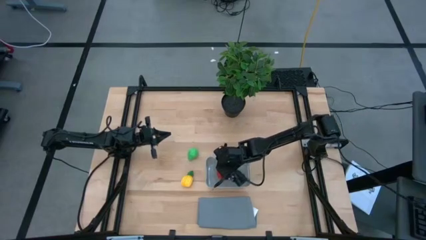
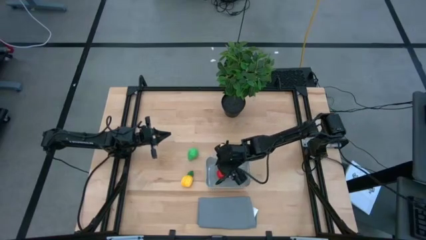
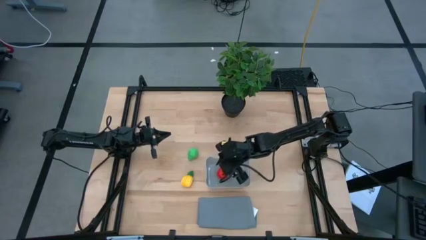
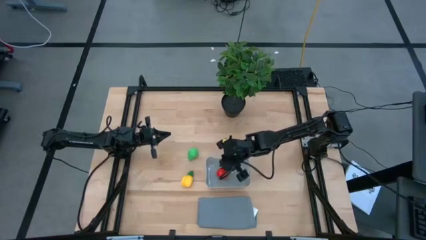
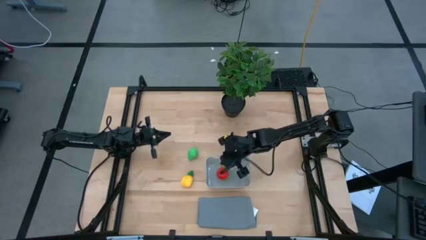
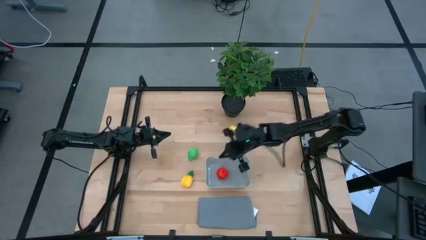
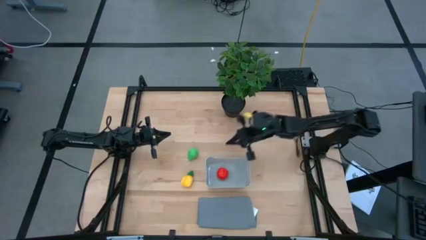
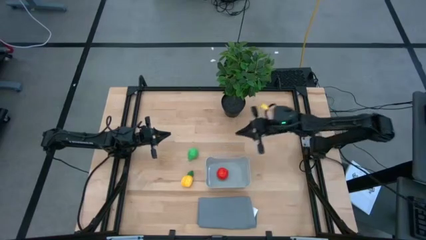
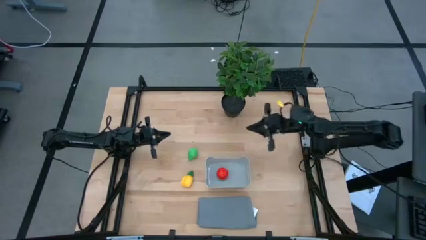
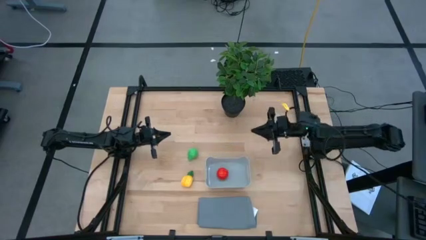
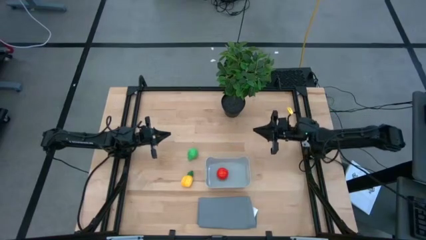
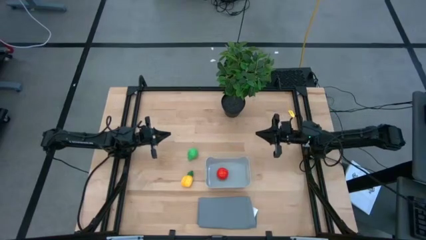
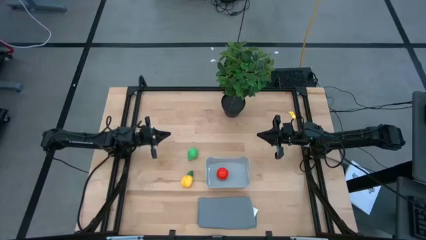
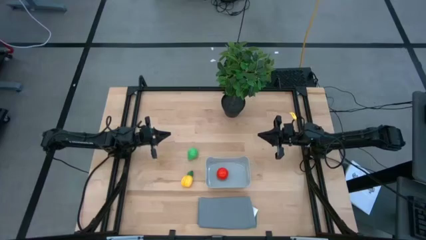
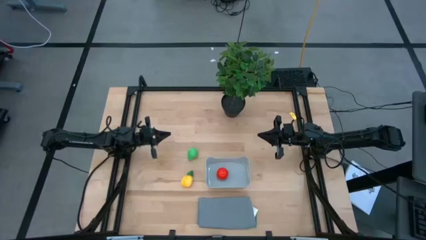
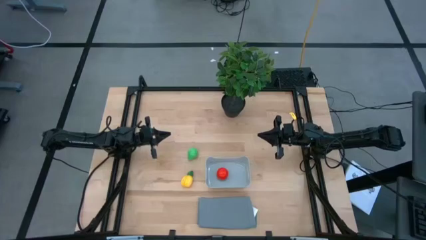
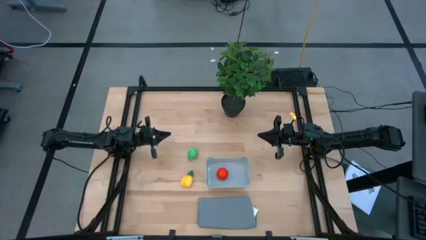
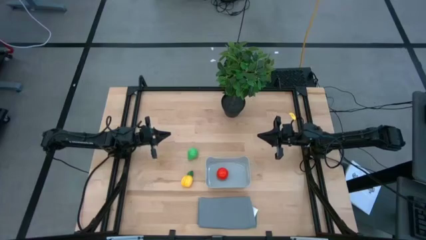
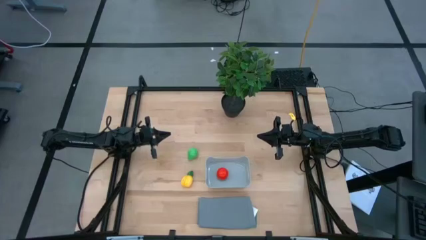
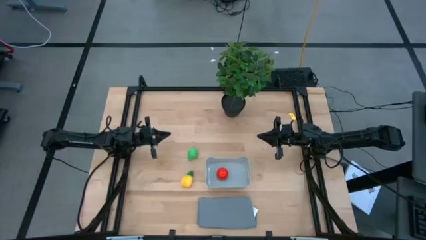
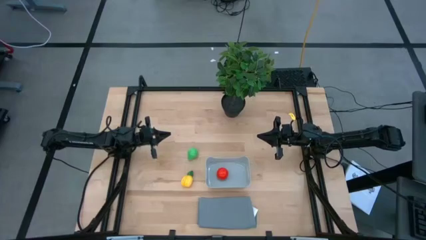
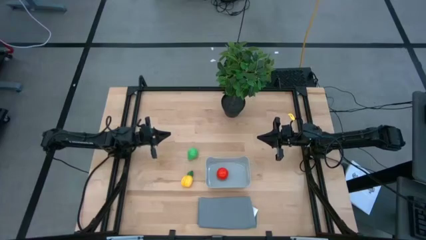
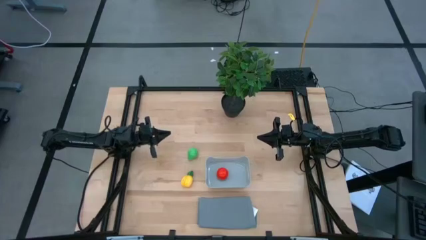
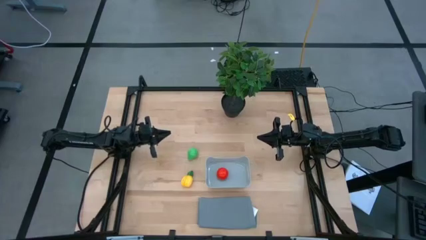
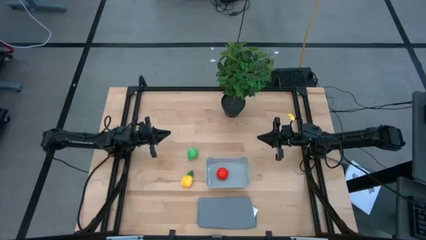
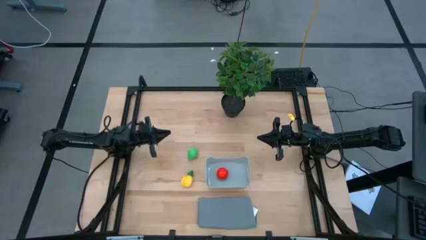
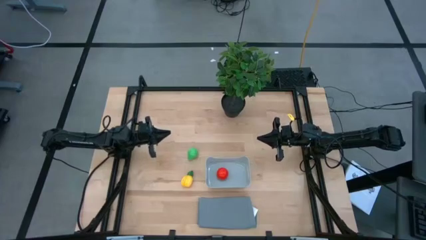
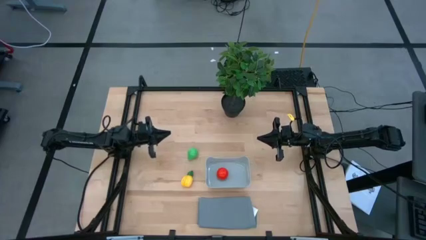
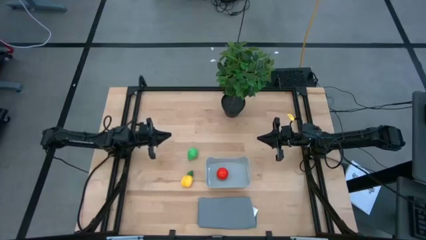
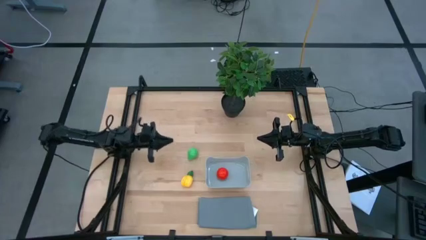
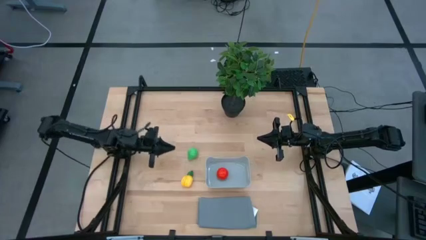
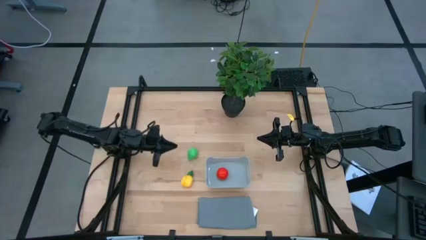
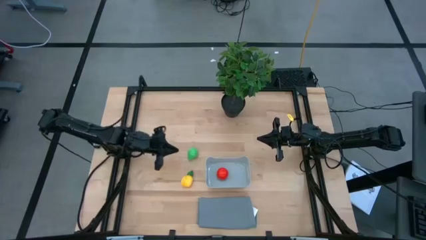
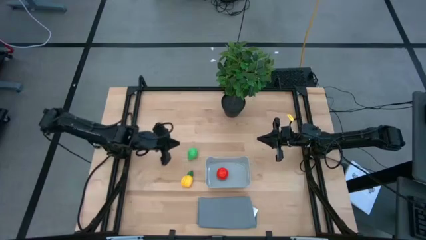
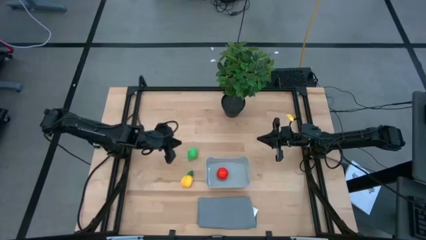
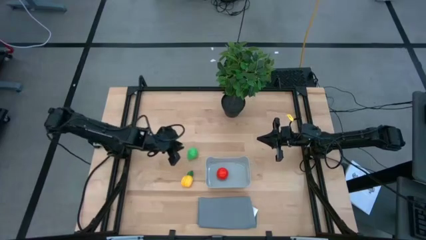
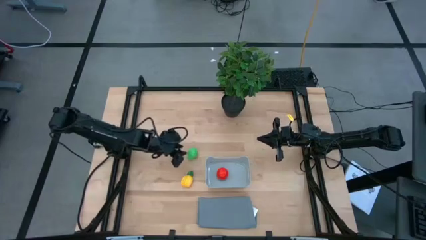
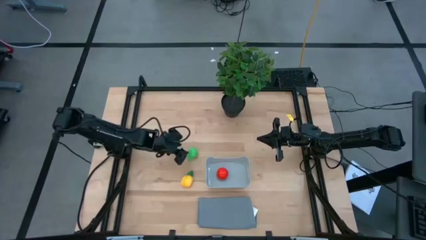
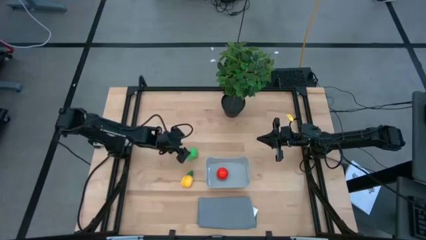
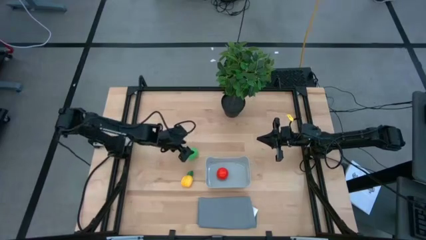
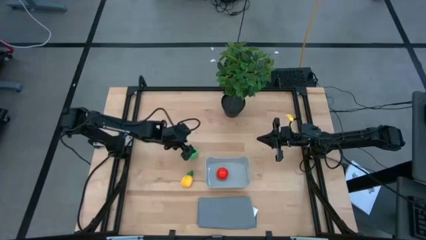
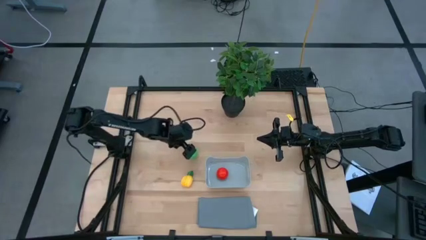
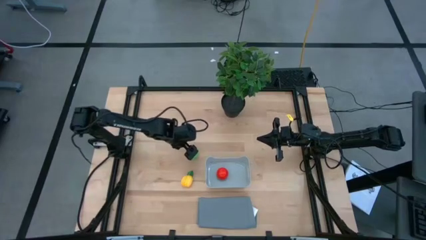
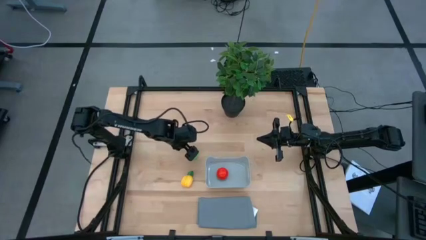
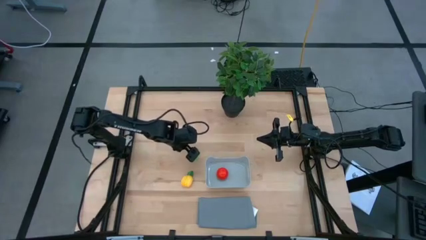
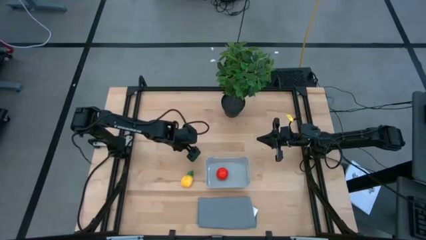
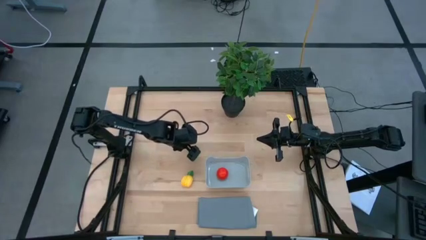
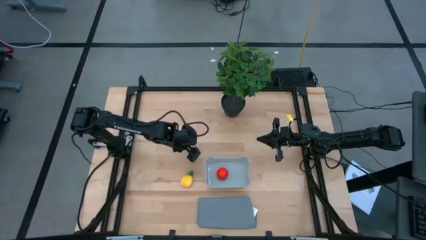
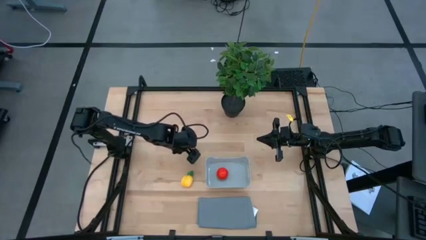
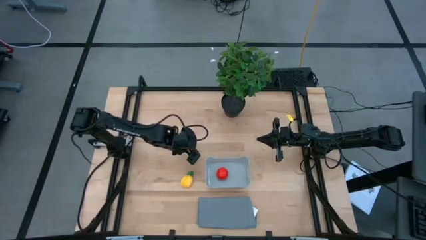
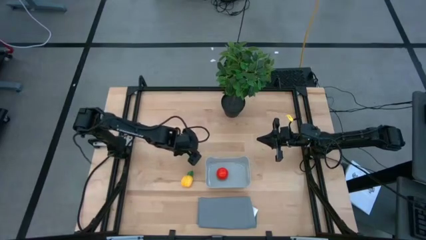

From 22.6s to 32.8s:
Task: Pick and placing Produce into tupperware
Put the pear into the gray bin

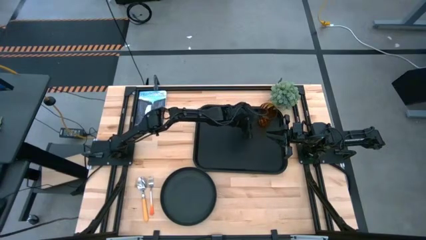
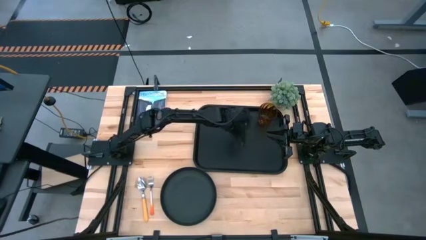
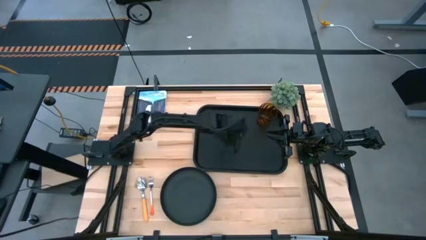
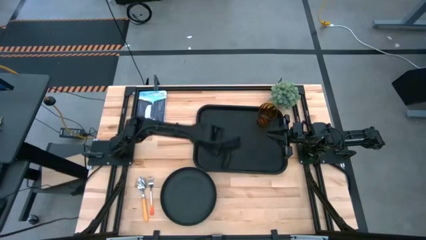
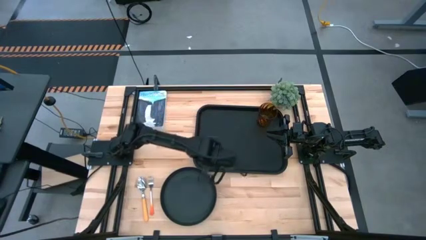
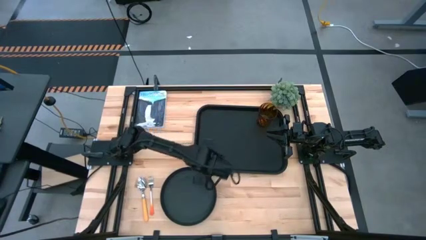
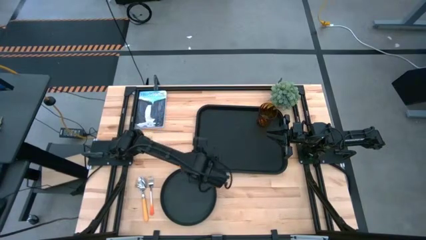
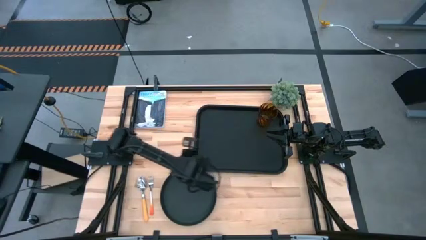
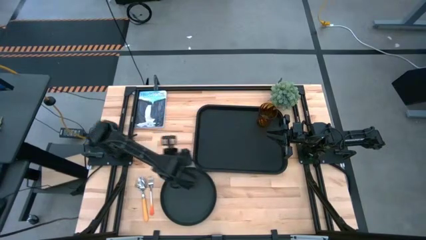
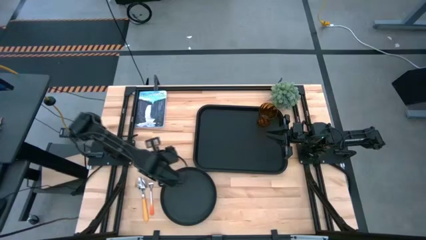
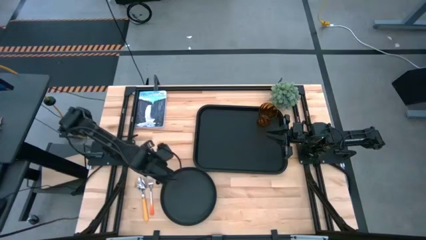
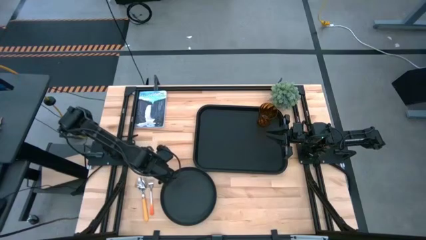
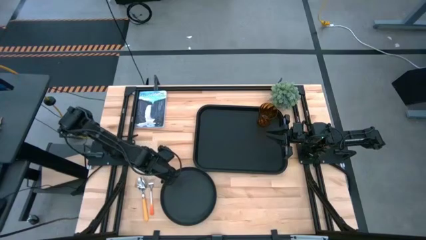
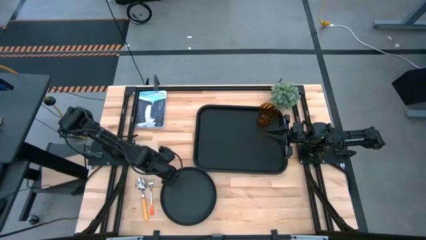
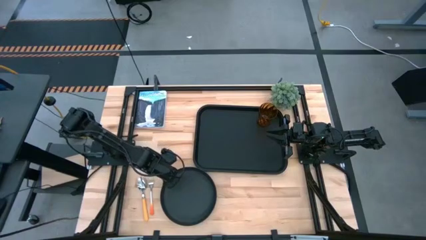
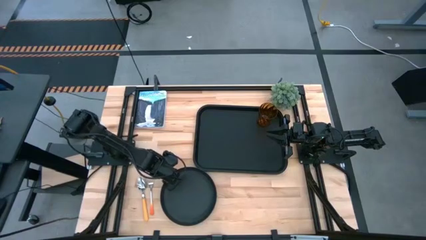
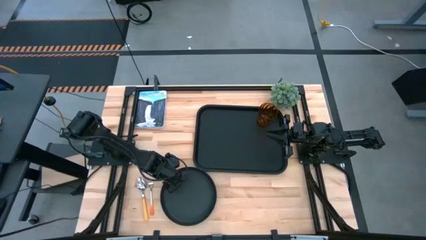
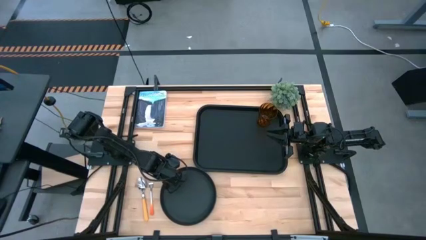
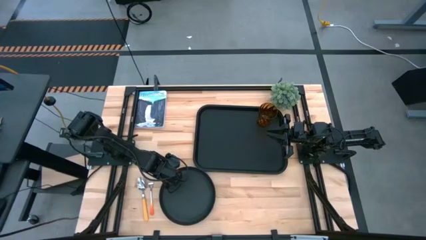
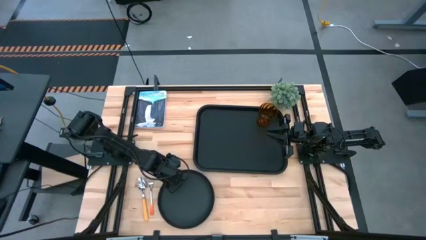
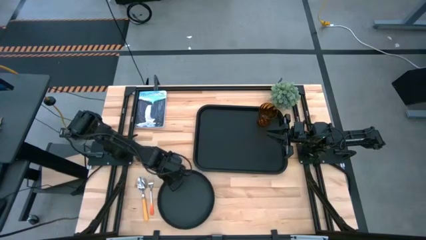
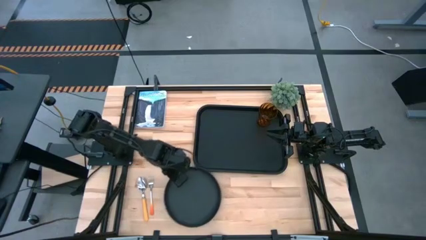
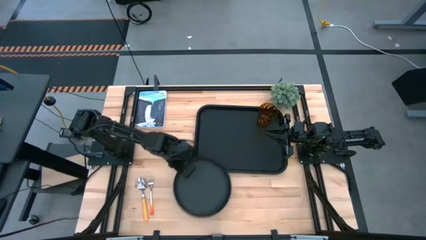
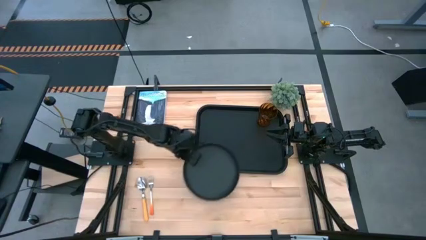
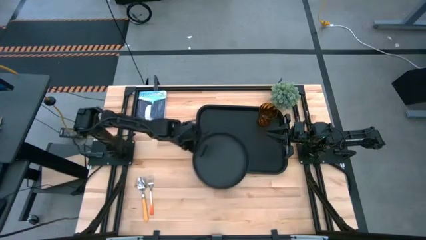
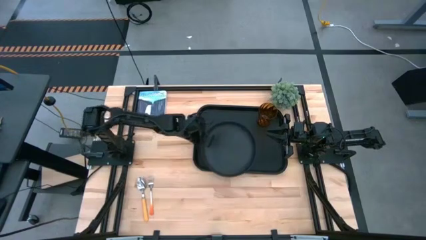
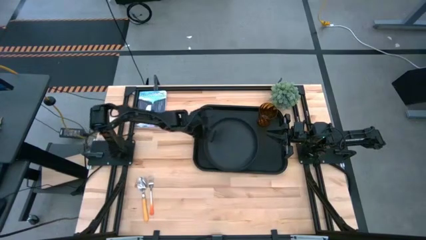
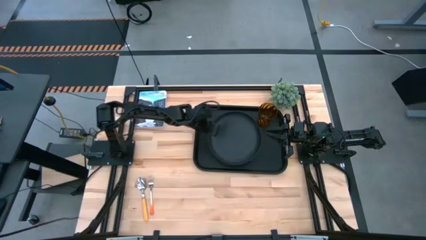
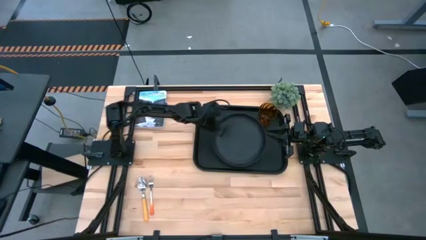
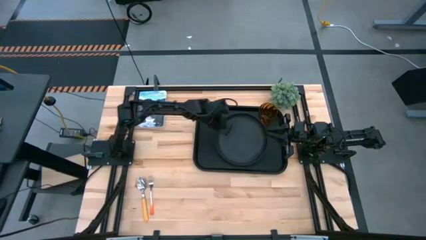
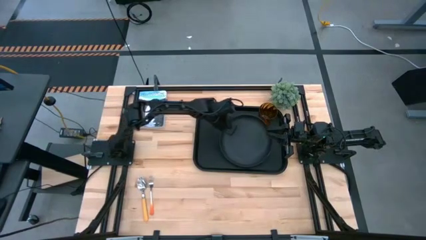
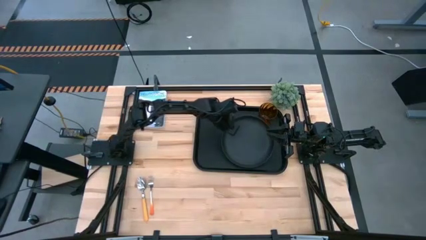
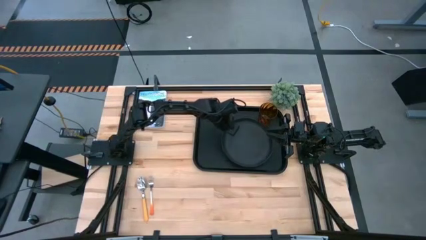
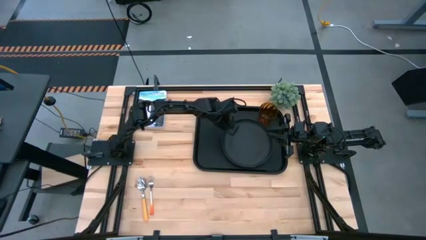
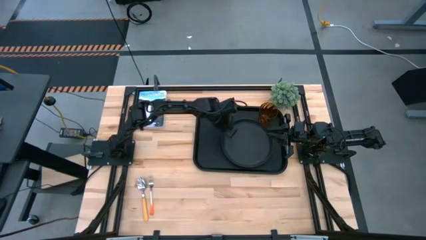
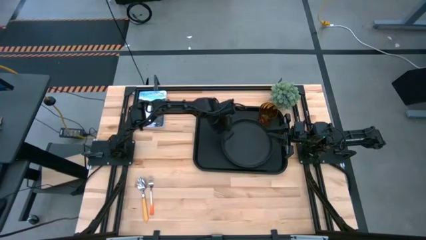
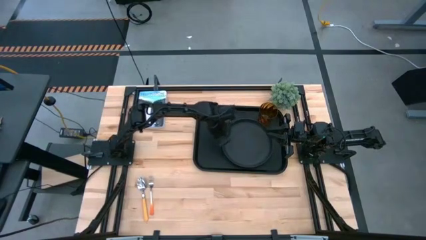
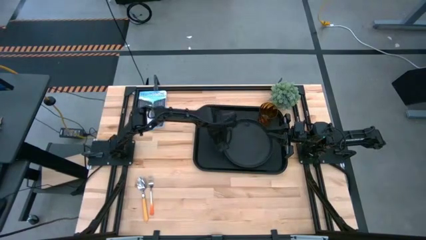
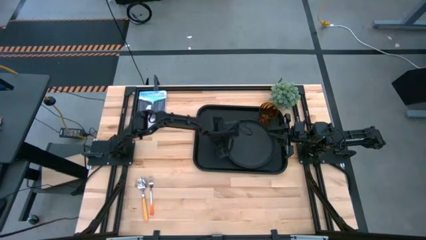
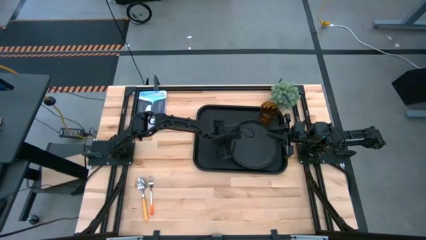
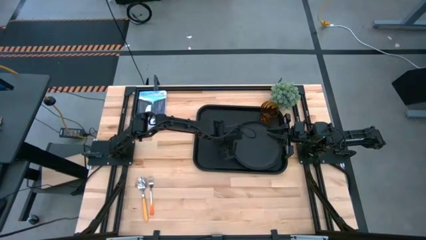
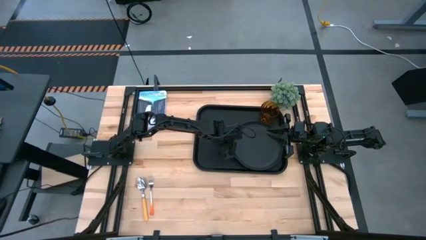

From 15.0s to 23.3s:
Task: Pick and place plate/cup/fork/spoon on tray
Put the black plate on the black tray to the bottom of the brown glass
